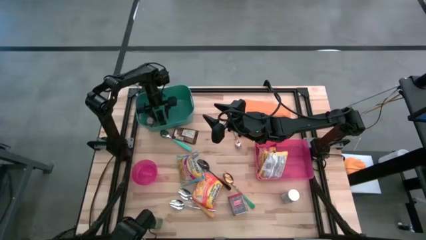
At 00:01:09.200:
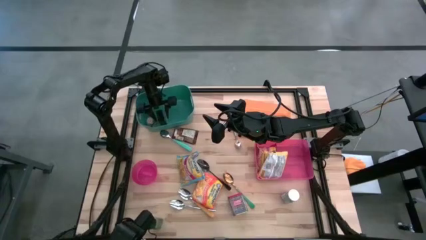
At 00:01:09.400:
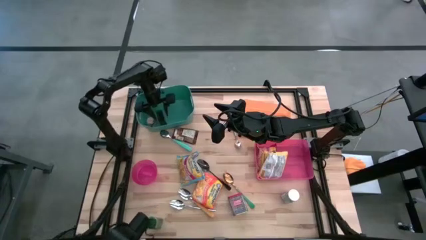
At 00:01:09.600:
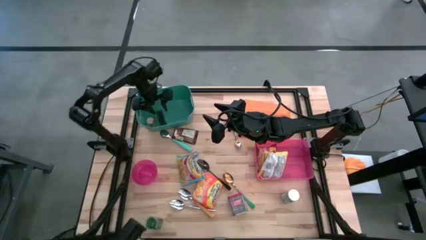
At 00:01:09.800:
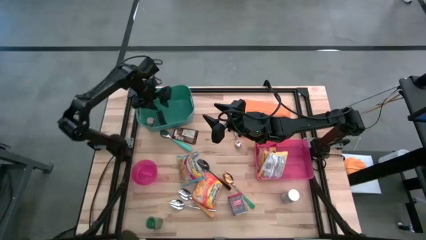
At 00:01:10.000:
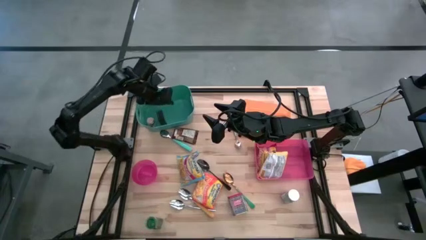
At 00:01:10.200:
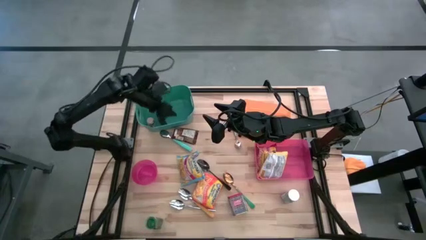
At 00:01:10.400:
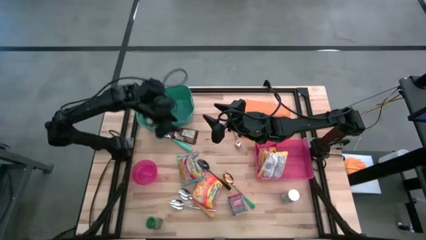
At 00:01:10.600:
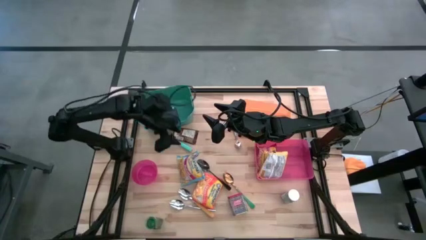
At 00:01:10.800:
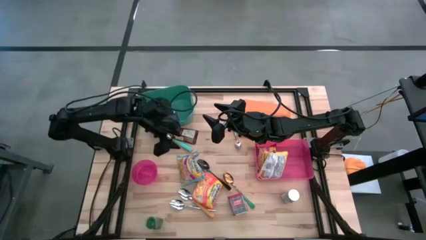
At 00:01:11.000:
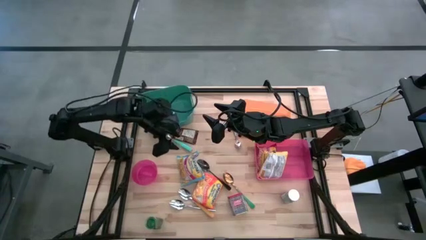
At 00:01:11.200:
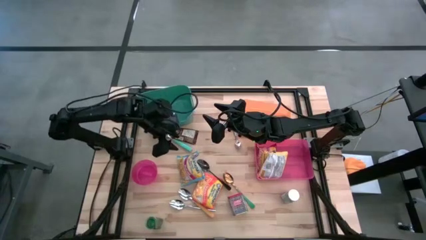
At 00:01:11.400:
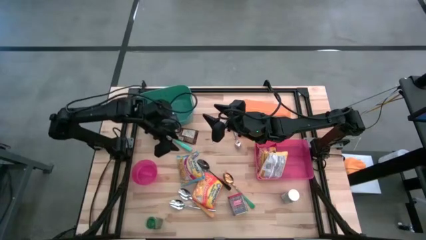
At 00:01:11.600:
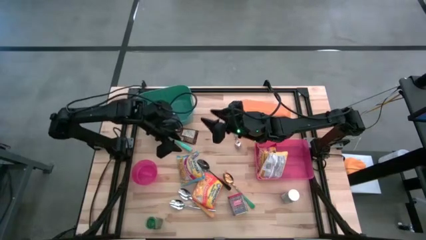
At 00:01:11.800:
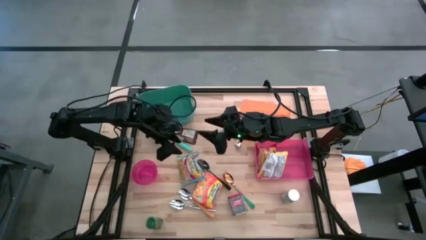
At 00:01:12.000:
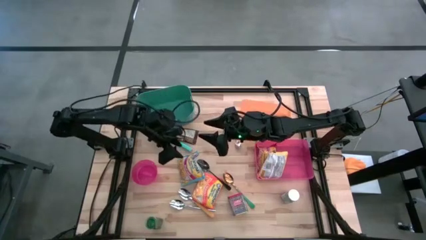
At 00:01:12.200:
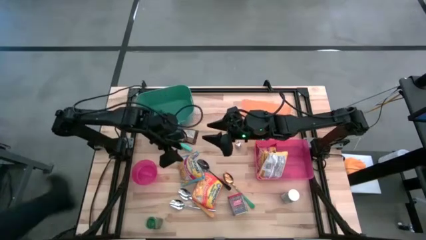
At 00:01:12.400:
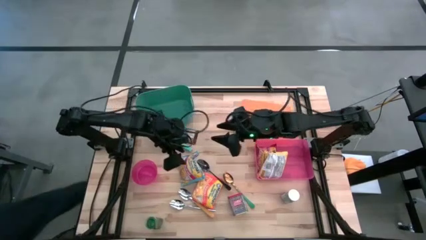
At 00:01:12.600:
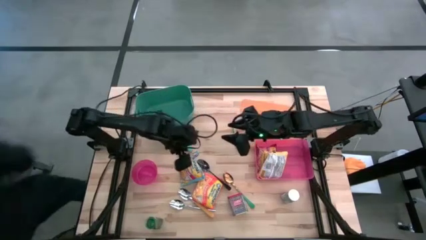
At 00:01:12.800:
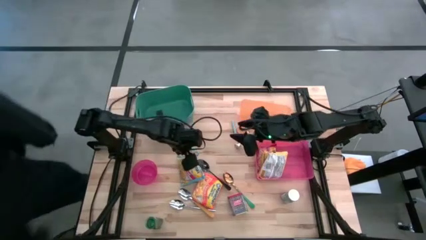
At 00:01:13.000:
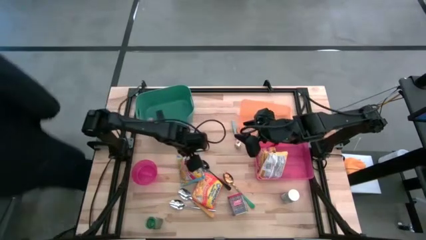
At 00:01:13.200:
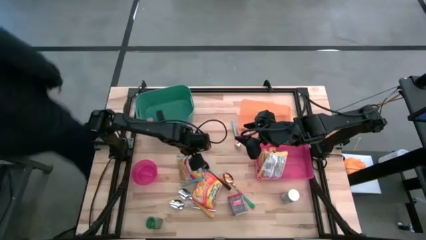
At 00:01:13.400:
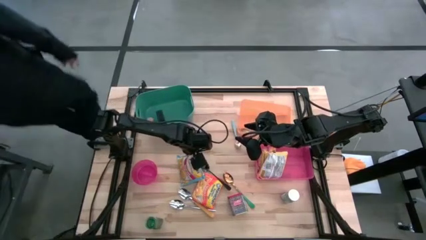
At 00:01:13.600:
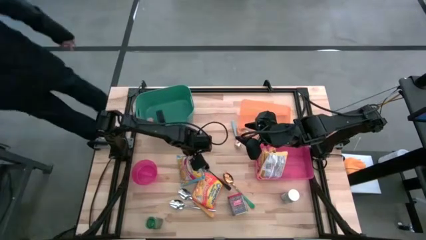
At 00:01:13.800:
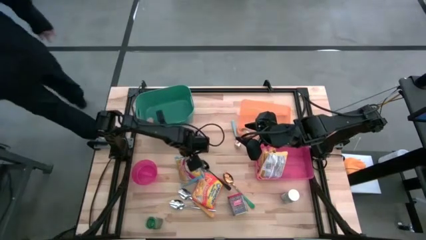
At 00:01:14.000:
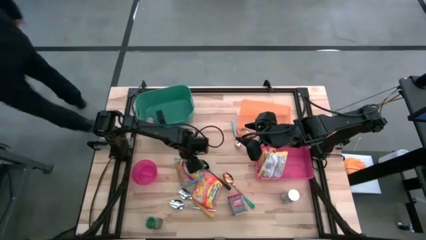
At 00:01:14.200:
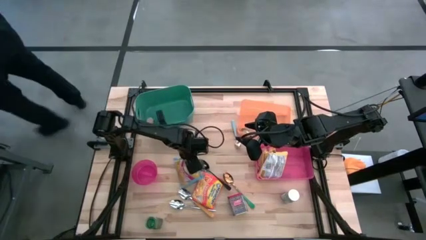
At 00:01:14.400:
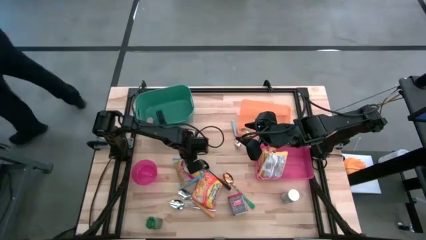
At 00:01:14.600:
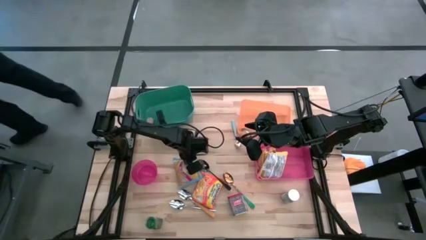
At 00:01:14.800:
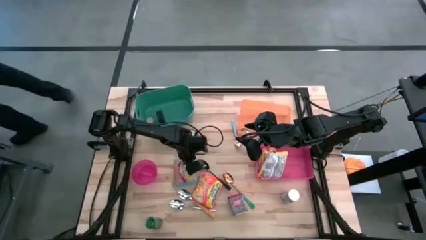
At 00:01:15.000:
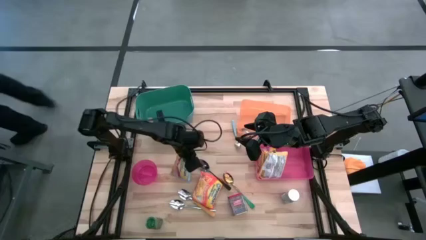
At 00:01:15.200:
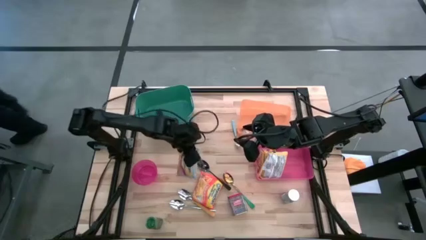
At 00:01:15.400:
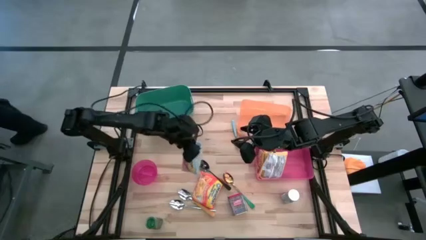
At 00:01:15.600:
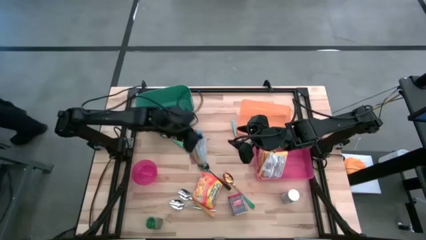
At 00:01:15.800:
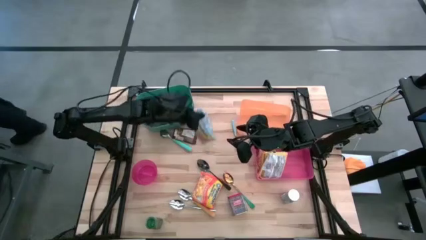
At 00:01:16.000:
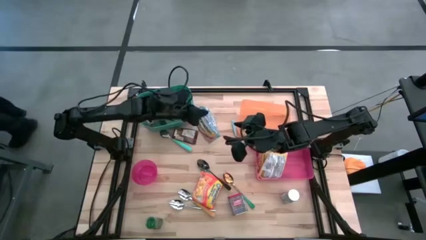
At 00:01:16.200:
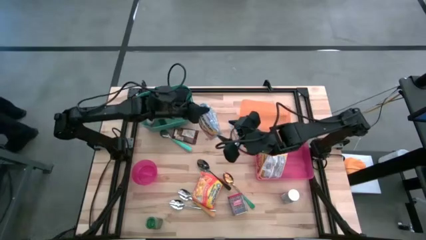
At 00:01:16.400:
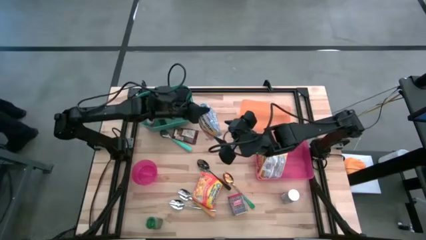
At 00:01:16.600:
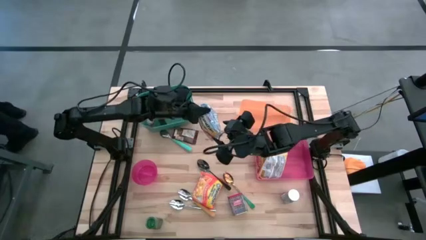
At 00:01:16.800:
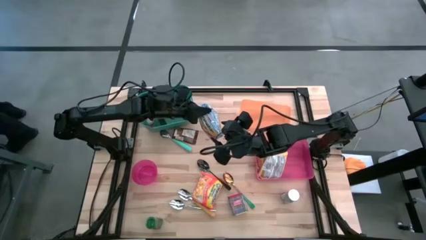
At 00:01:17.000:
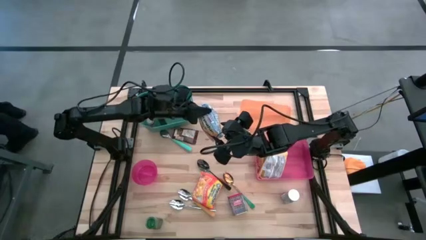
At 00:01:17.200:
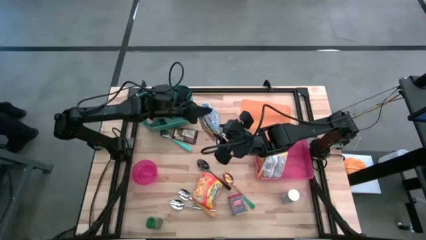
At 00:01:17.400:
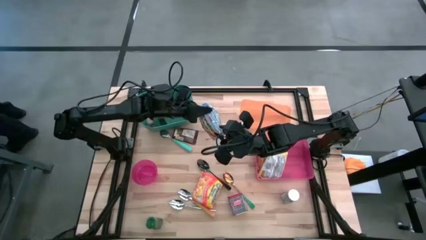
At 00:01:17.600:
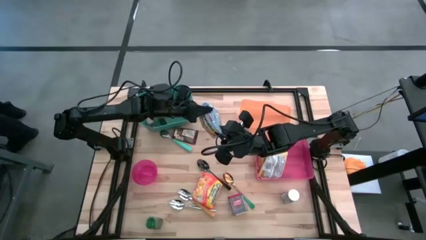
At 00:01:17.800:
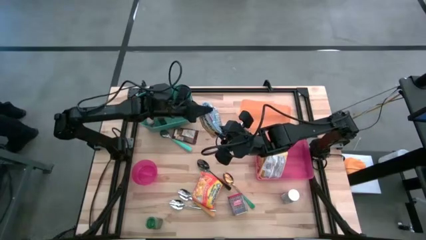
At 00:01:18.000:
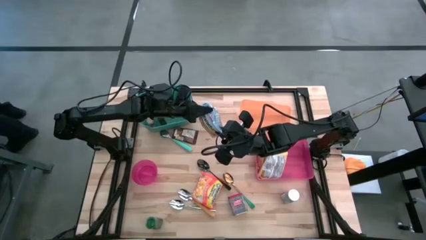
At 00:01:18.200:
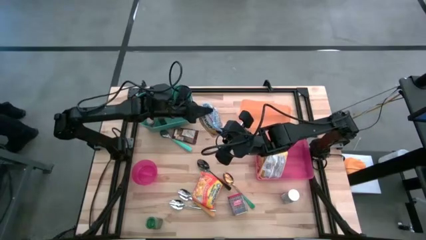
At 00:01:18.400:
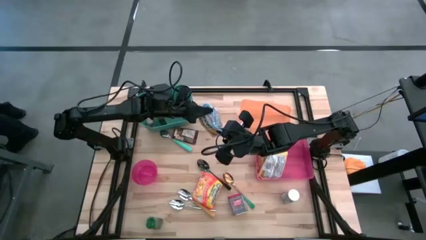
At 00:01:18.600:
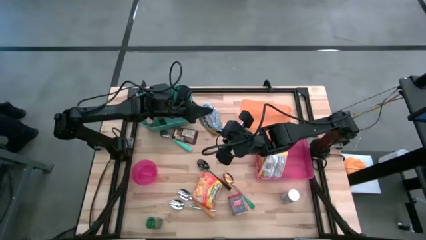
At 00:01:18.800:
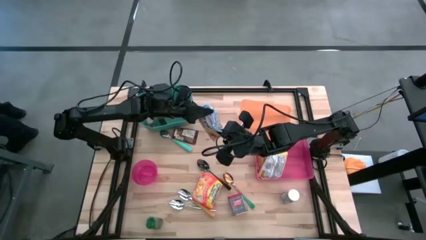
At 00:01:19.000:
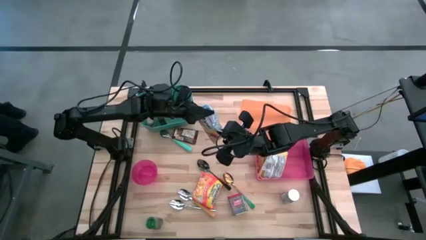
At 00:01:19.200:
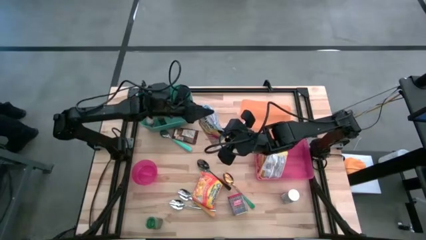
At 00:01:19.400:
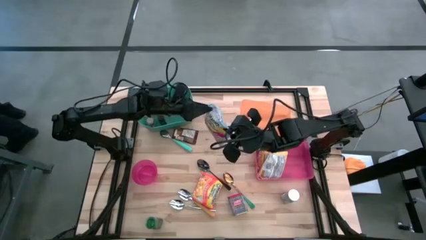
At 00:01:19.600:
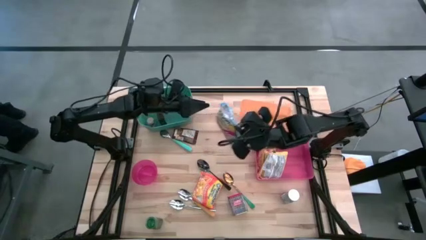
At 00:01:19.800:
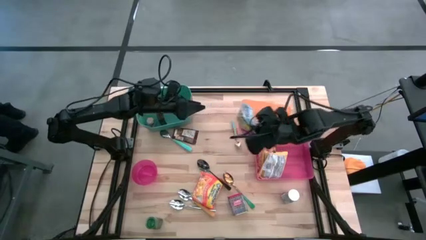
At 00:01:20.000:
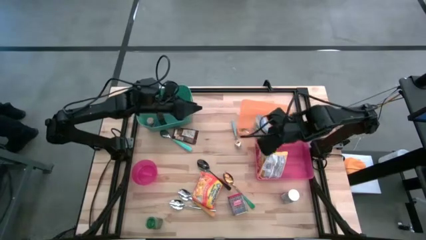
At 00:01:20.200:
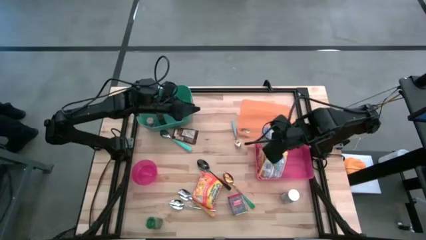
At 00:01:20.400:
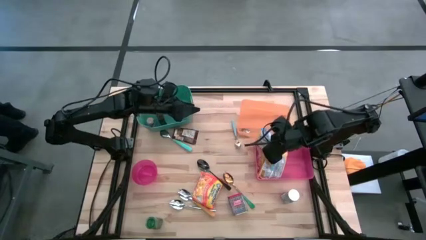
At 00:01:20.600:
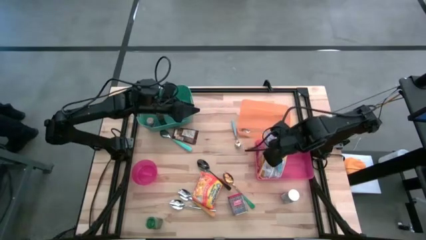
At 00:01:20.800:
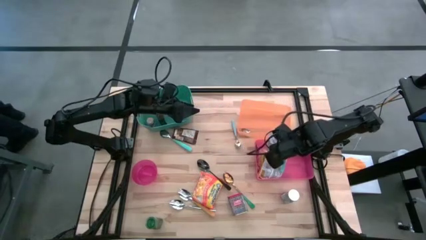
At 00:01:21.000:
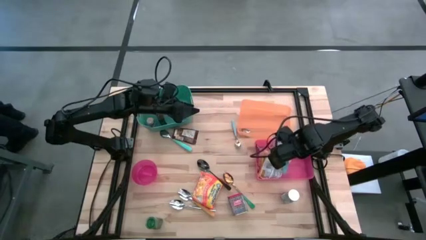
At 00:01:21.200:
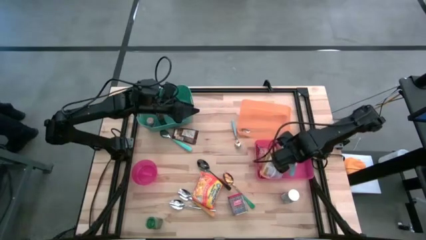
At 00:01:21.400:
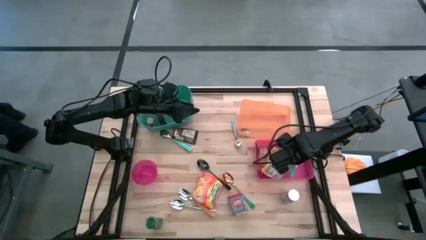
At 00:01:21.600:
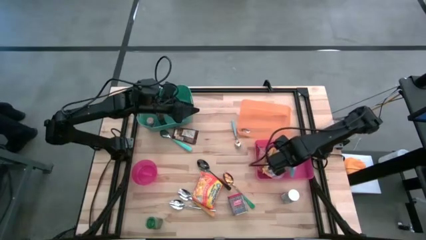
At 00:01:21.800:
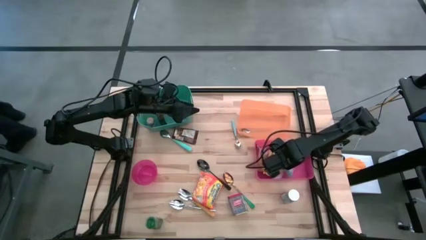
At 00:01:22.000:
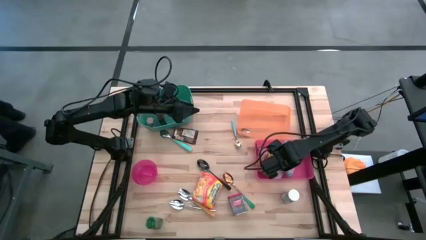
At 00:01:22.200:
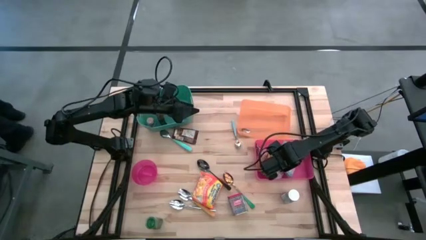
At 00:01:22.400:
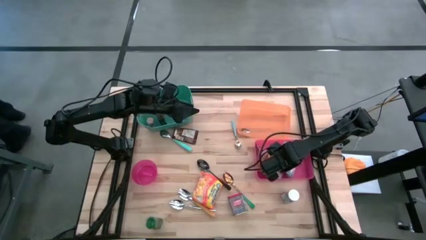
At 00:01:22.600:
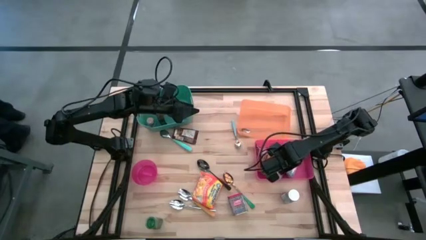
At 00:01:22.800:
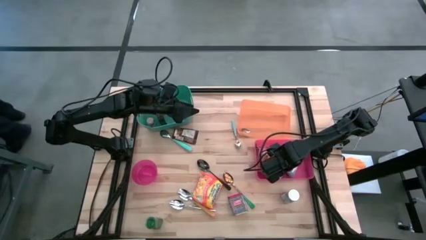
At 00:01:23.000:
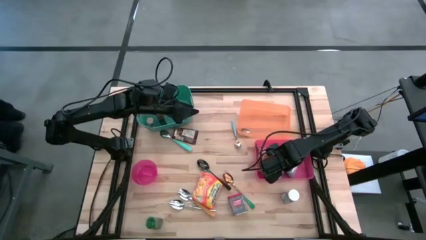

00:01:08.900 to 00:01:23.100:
Put the blue noodle pack into the pink bin
